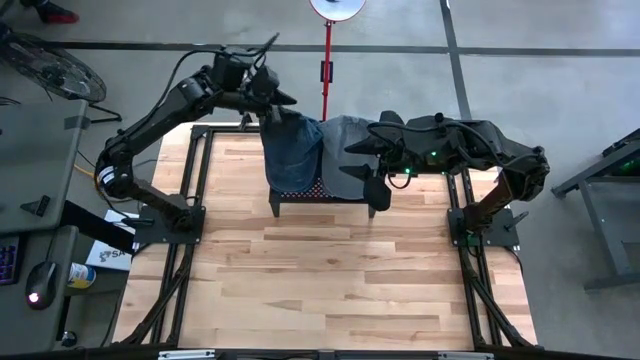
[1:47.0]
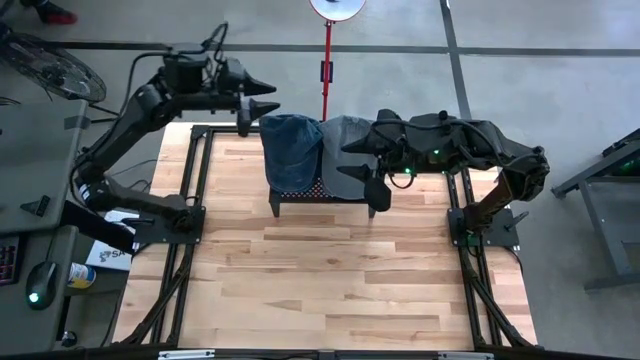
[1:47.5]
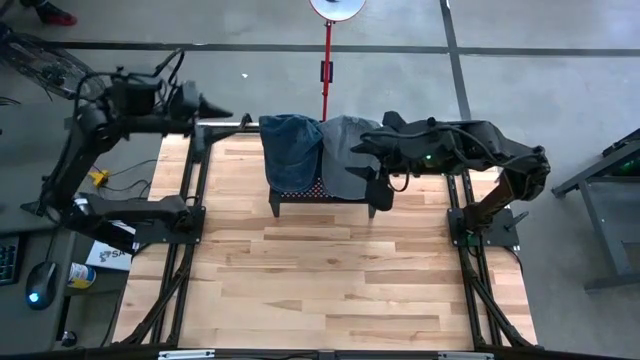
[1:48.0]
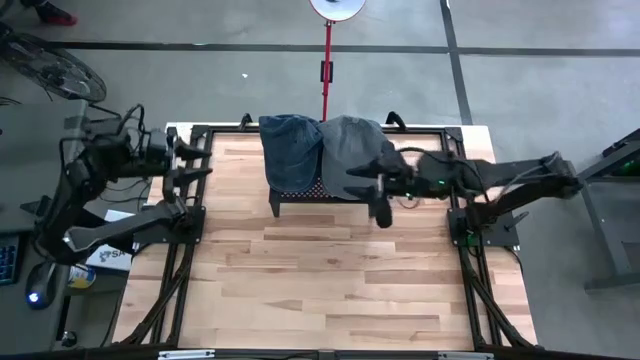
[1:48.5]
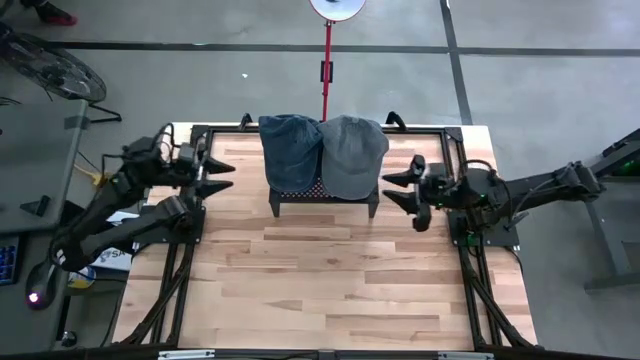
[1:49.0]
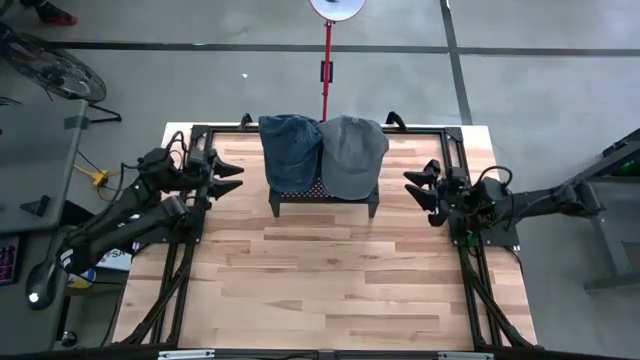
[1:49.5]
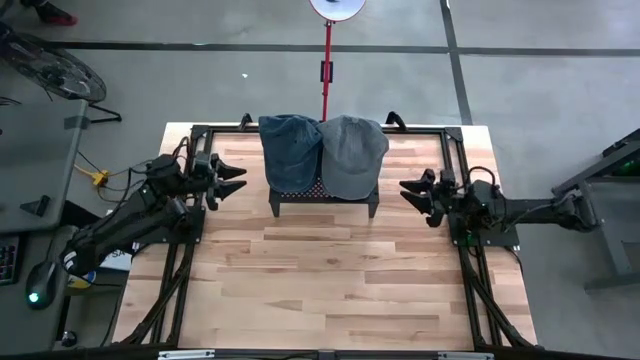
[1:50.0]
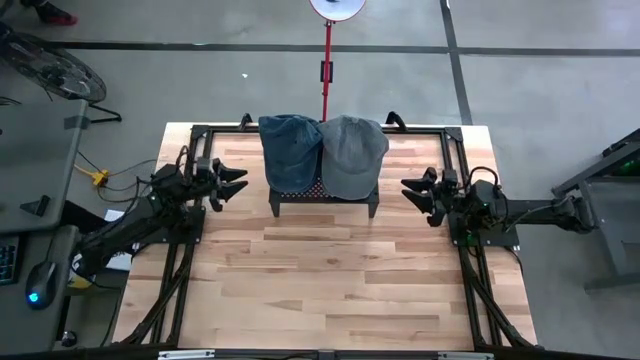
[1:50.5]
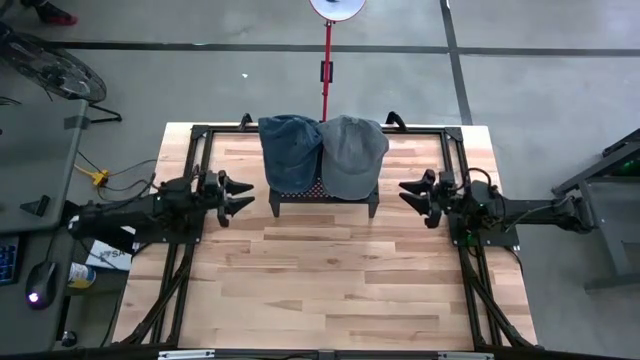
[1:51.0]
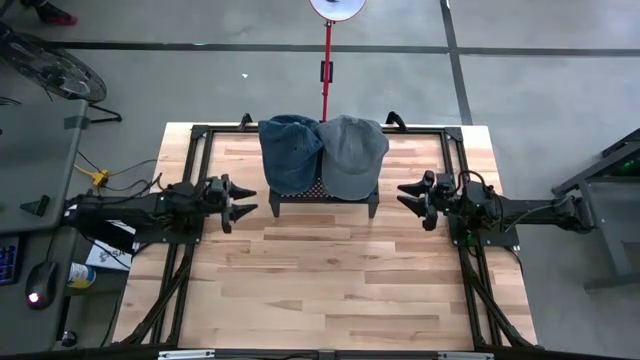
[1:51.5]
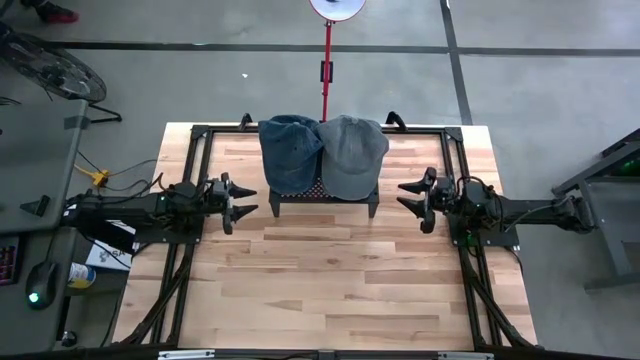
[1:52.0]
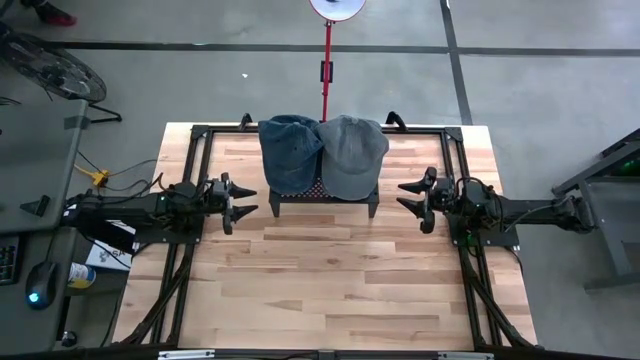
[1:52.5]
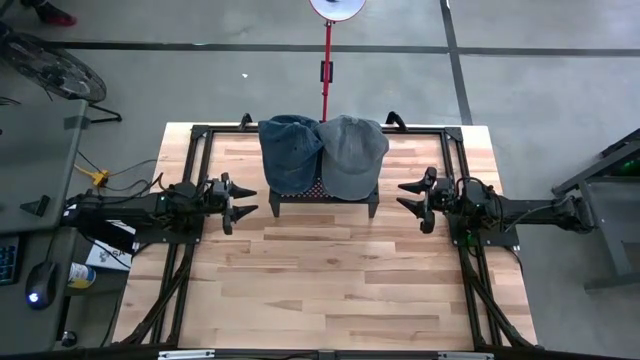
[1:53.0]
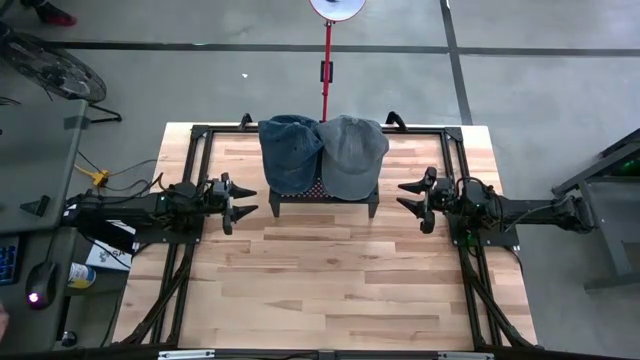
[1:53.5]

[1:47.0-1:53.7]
Task: Pick & Place hat
Return to Home Position

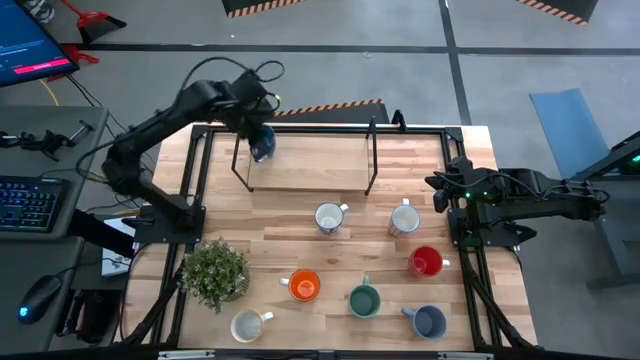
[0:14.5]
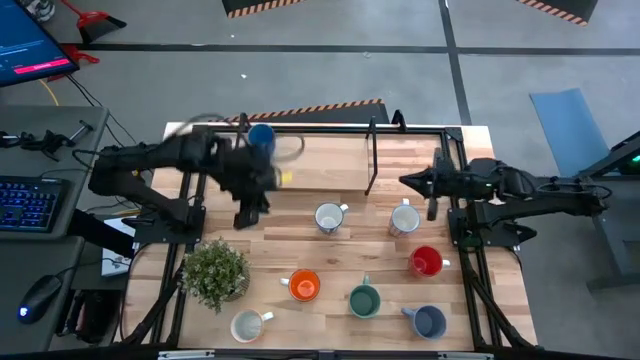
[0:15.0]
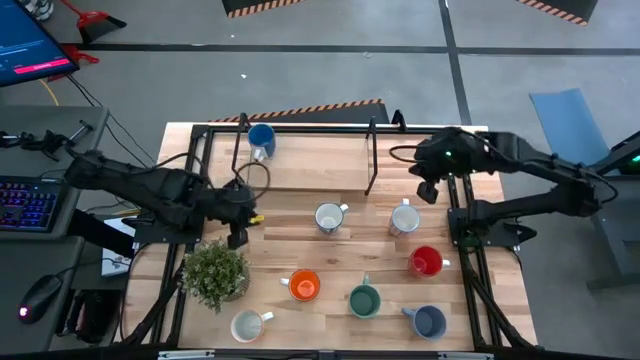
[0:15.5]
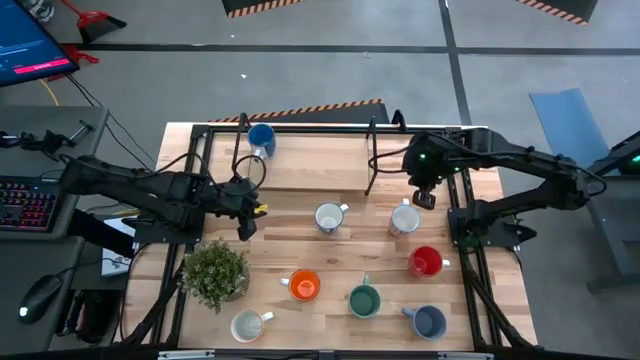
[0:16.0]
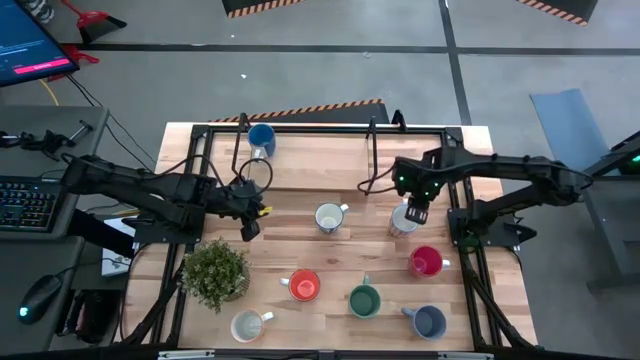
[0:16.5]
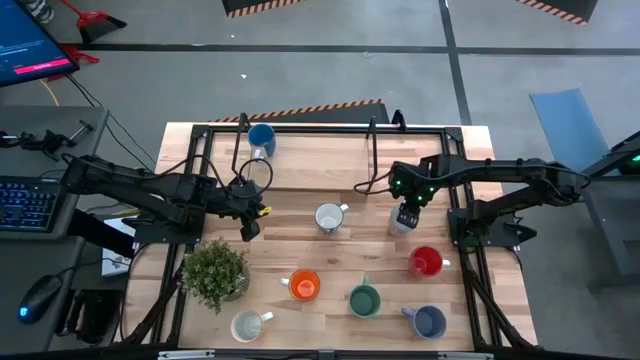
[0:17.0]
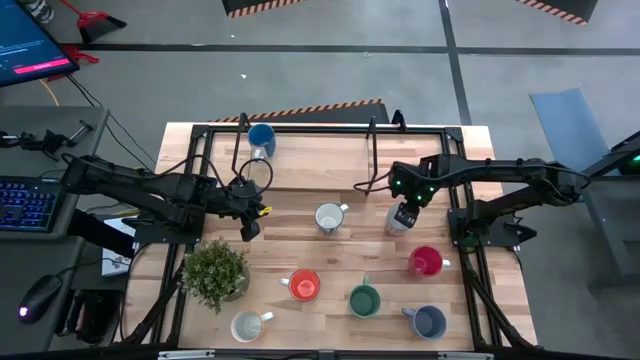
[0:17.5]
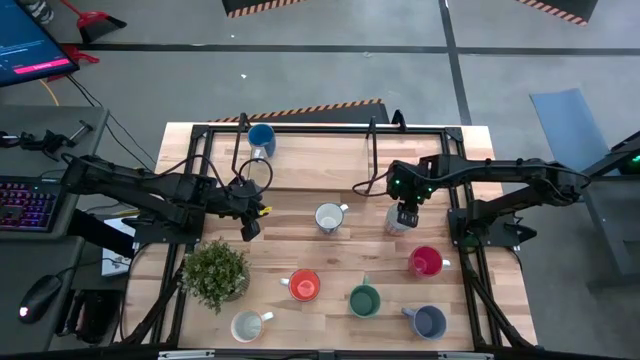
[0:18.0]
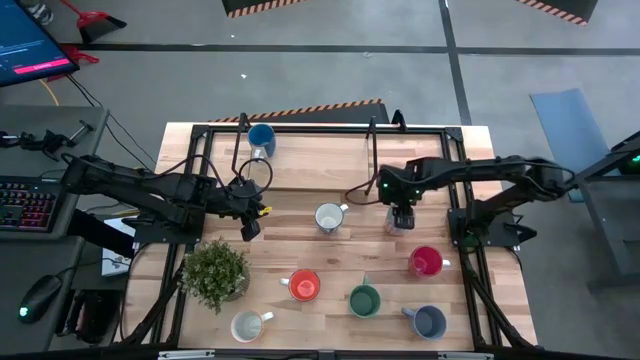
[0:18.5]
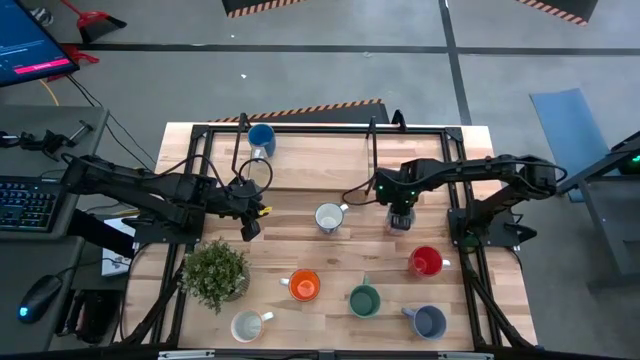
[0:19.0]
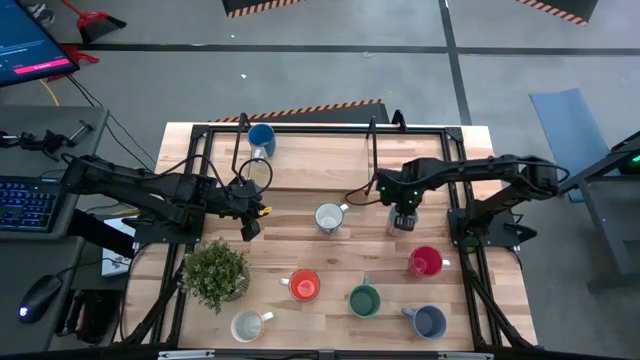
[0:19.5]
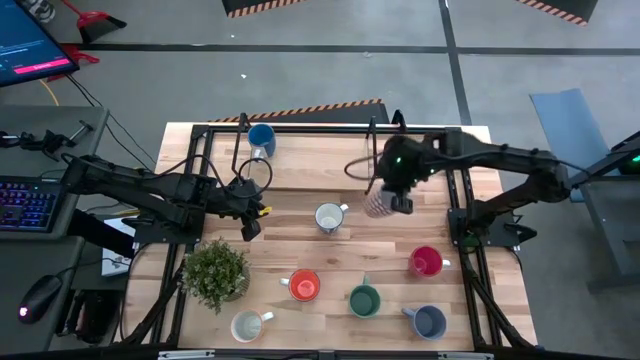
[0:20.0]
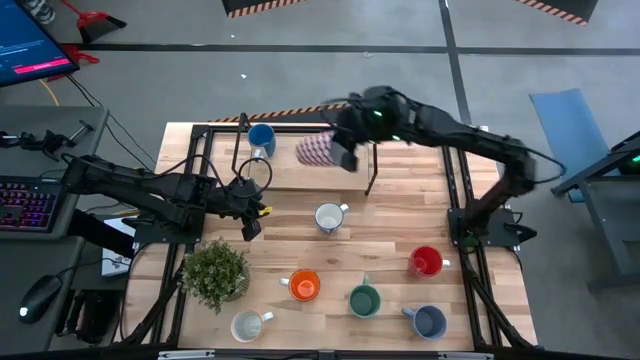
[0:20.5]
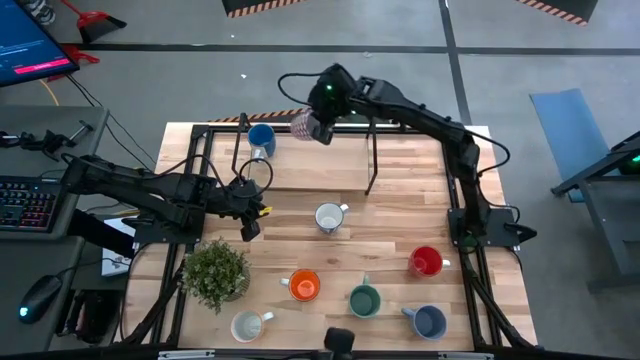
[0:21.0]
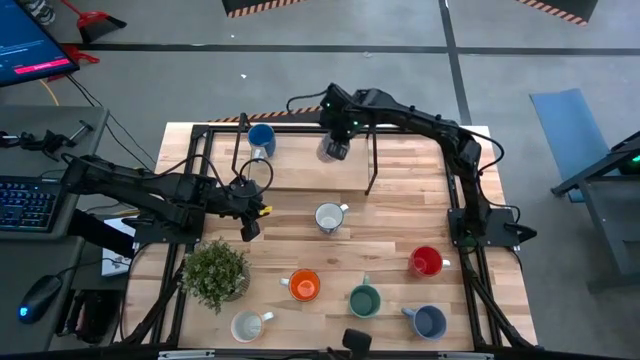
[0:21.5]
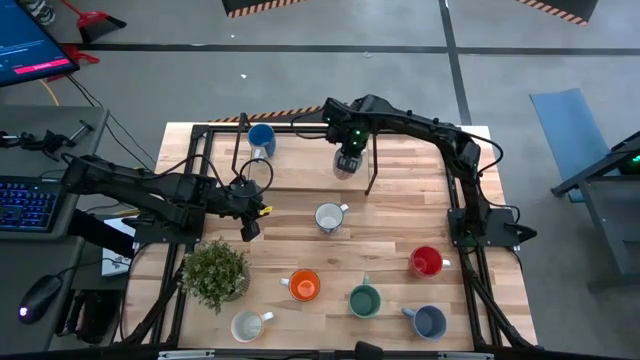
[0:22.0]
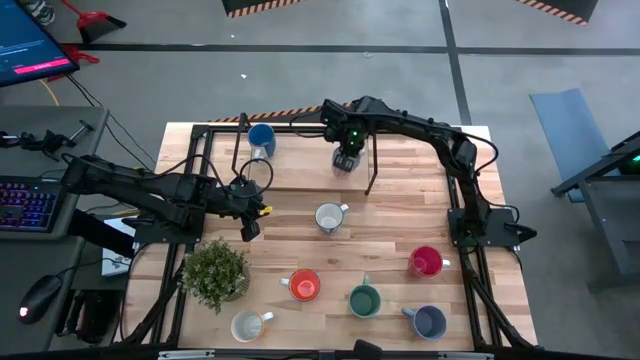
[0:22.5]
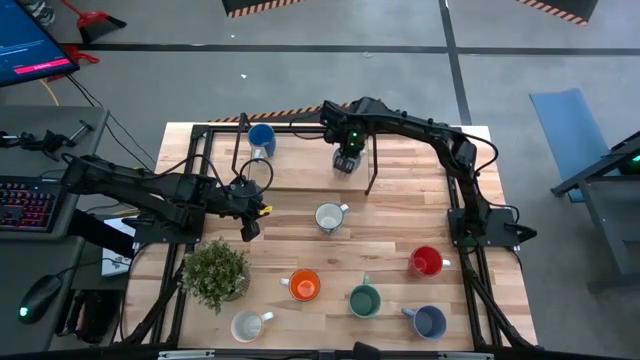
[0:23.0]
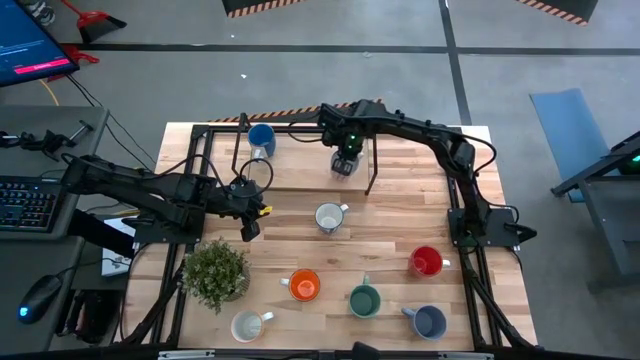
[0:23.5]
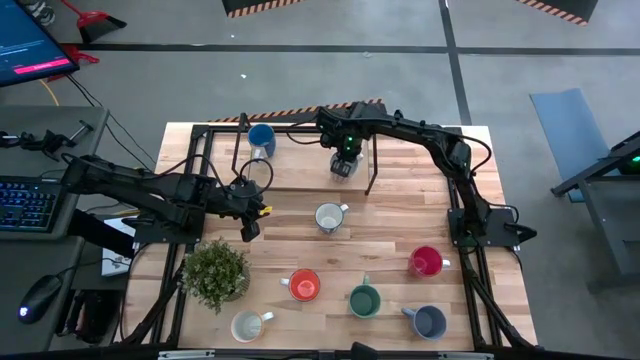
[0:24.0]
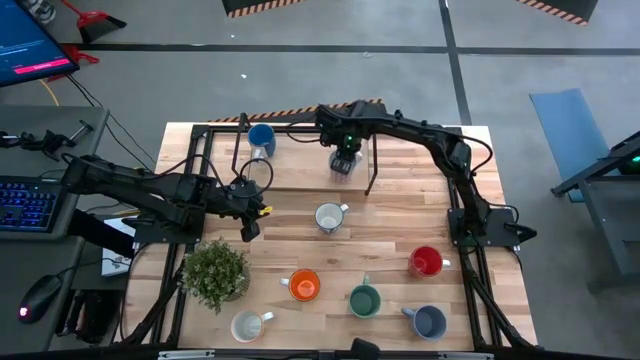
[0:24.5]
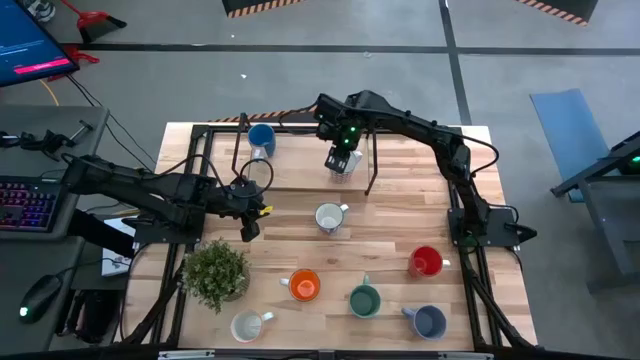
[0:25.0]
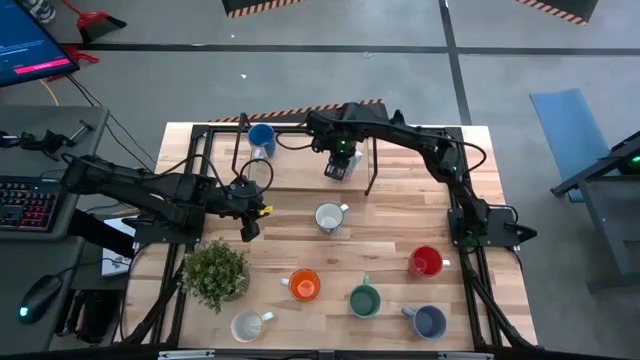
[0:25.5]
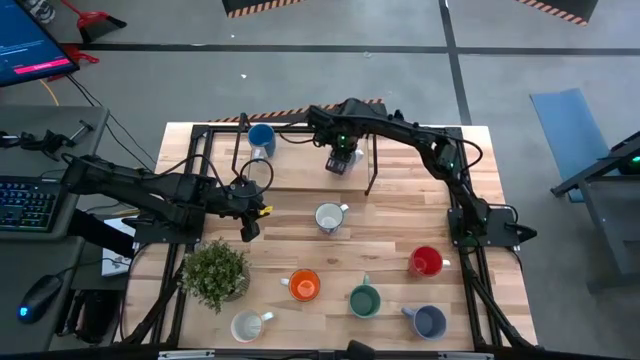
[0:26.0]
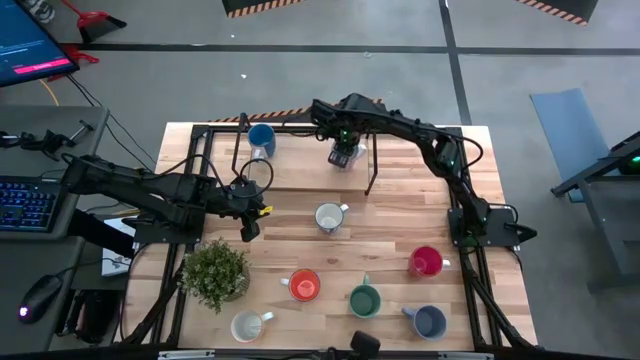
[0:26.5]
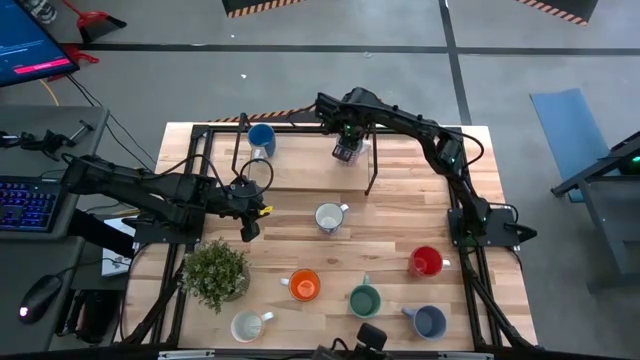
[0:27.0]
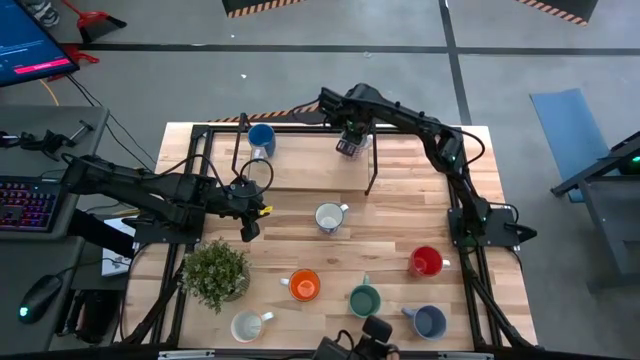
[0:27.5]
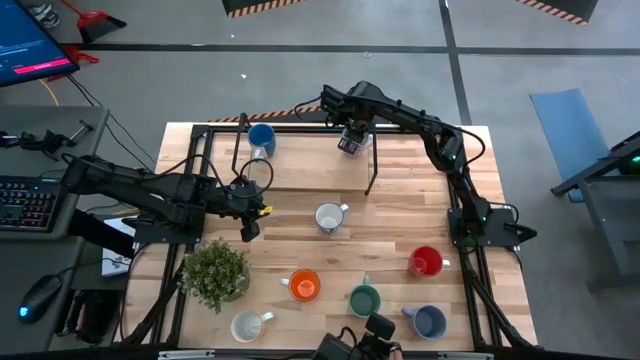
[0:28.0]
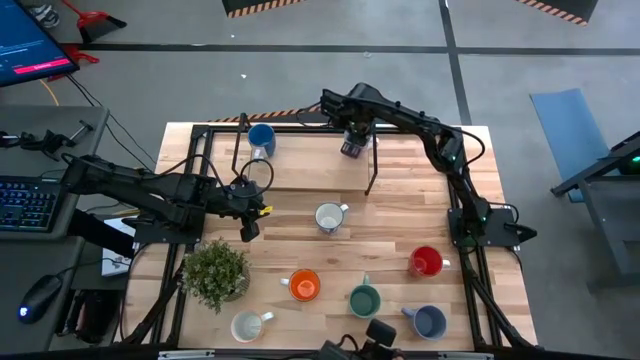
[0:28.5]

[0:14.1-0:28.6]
Task: Place coffee mugs
Put the red pattern mug on the shelf
